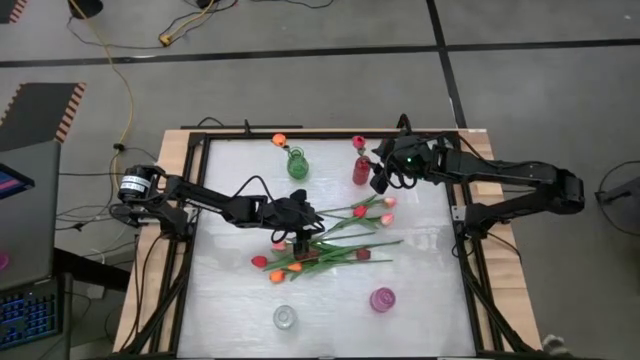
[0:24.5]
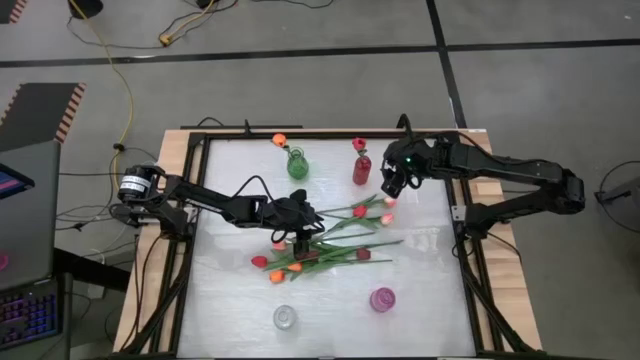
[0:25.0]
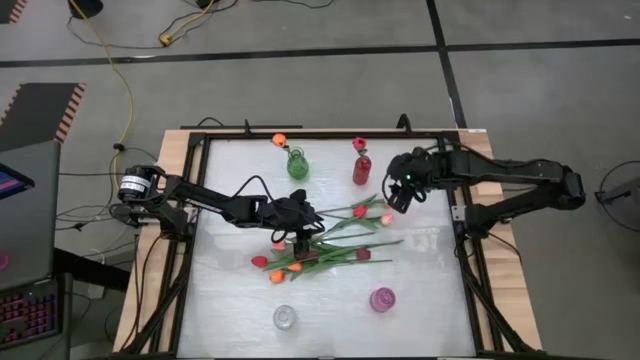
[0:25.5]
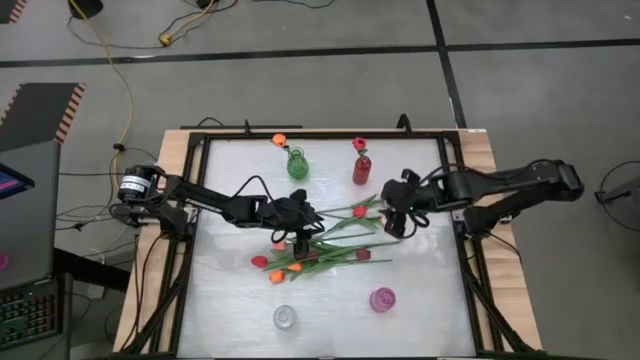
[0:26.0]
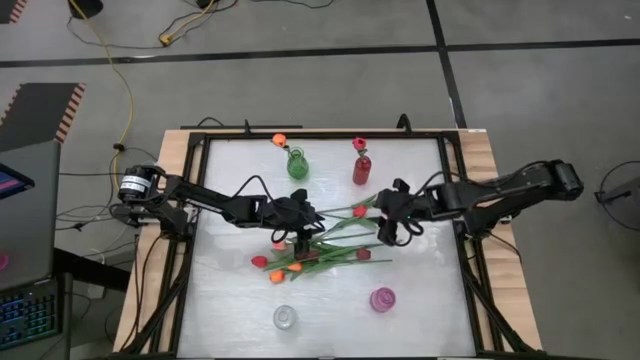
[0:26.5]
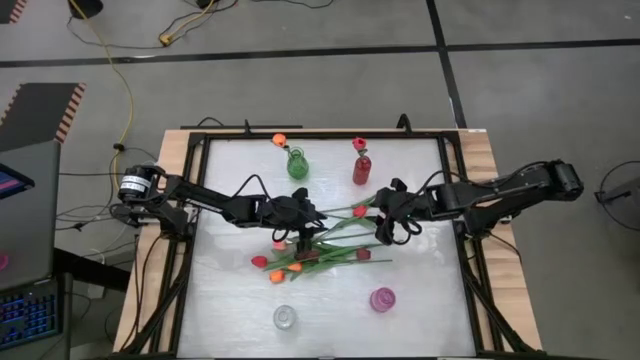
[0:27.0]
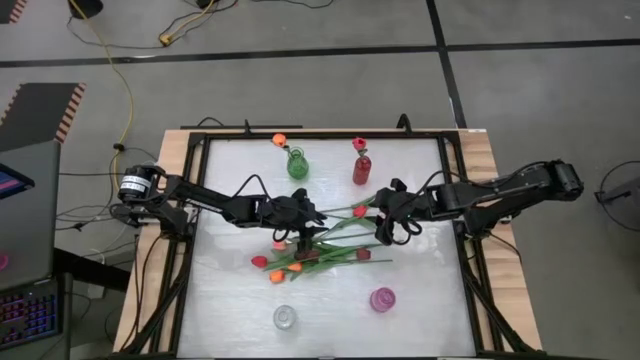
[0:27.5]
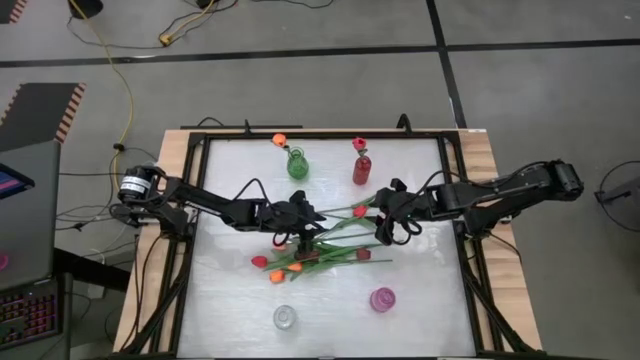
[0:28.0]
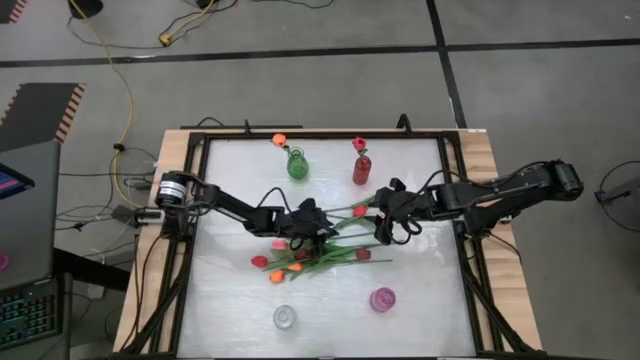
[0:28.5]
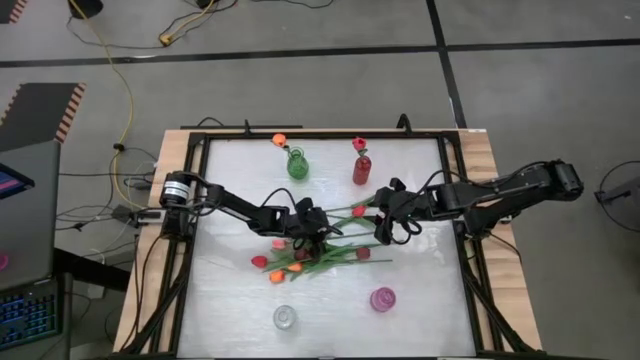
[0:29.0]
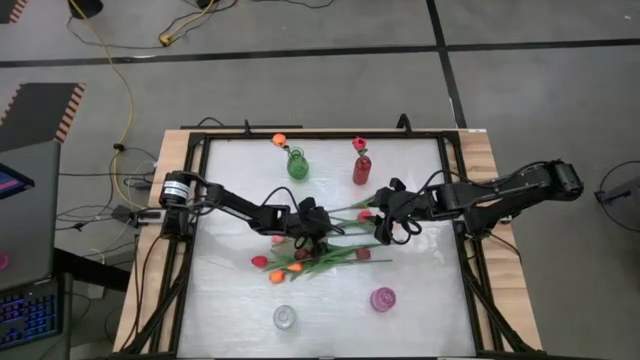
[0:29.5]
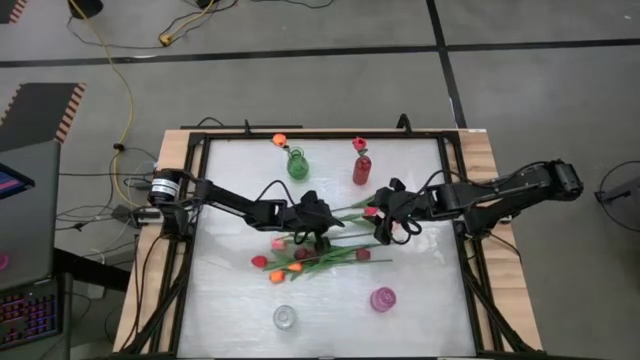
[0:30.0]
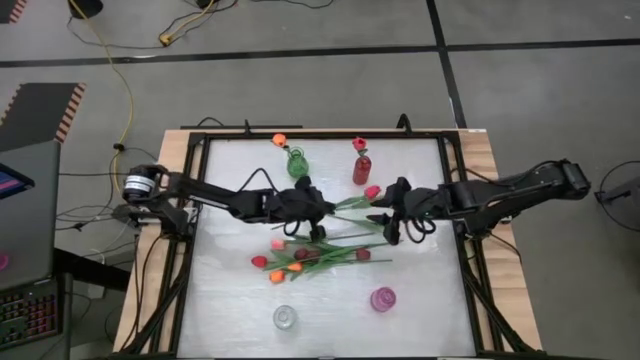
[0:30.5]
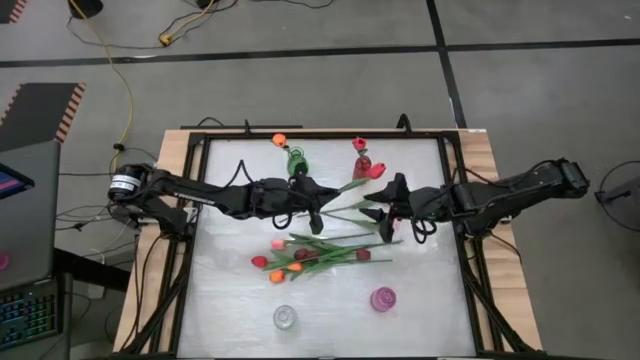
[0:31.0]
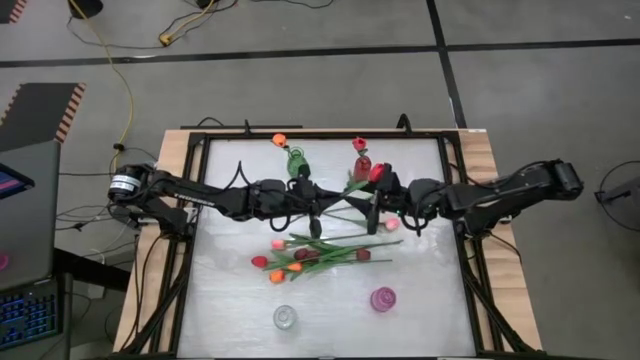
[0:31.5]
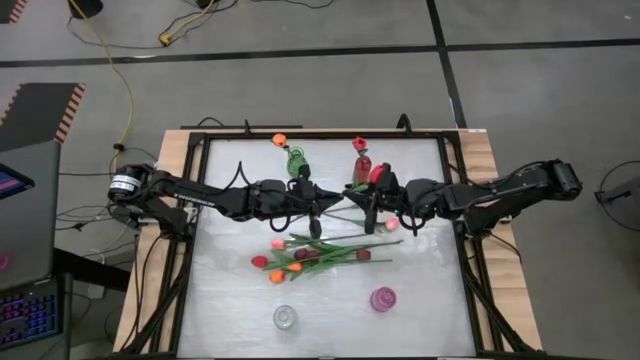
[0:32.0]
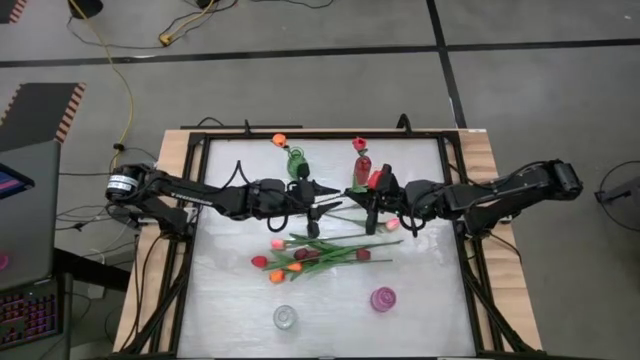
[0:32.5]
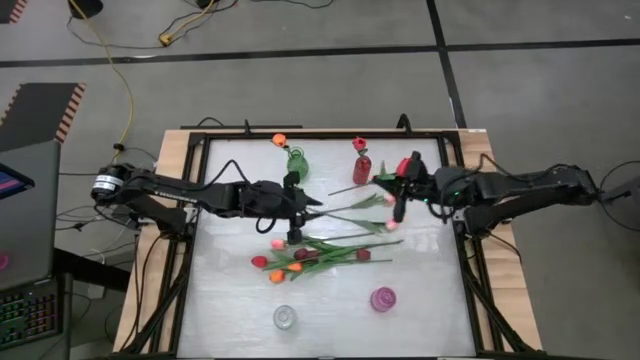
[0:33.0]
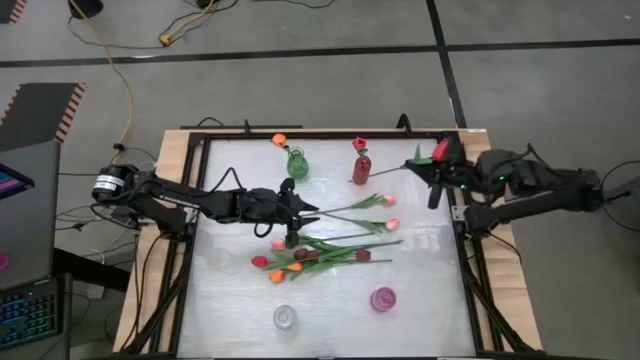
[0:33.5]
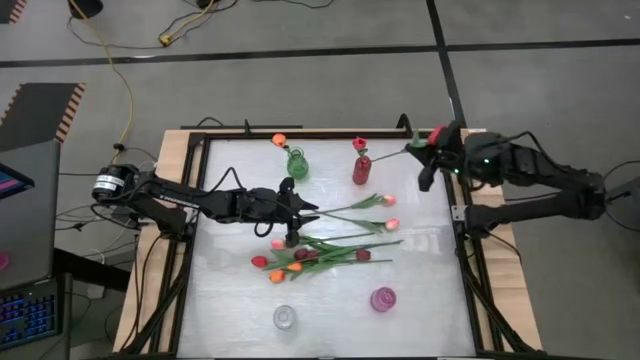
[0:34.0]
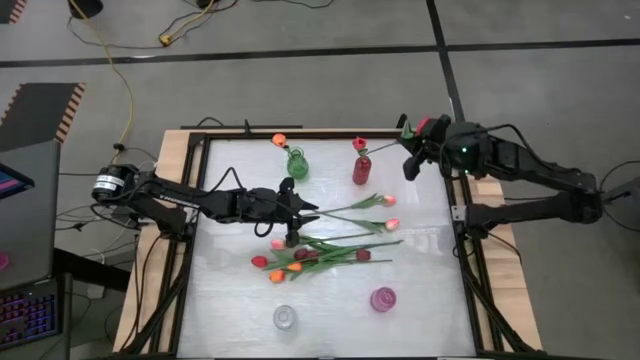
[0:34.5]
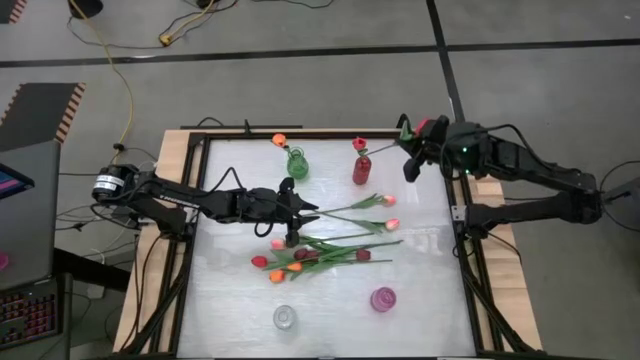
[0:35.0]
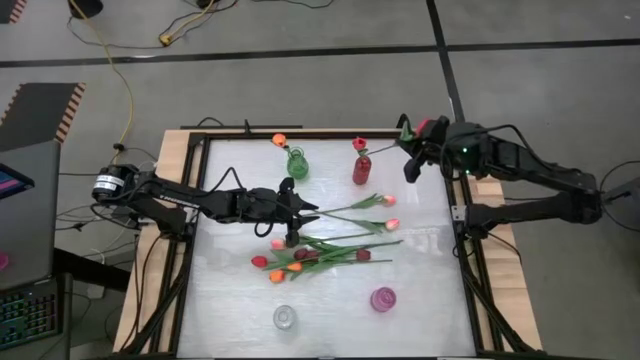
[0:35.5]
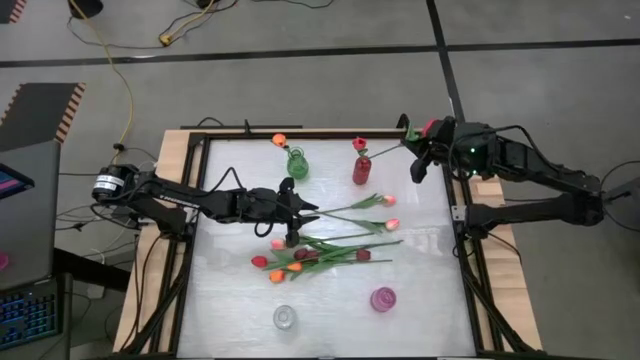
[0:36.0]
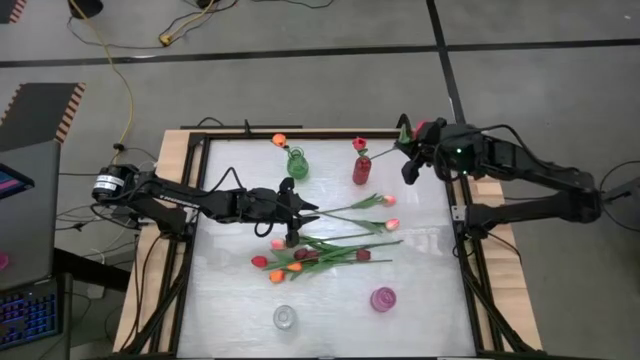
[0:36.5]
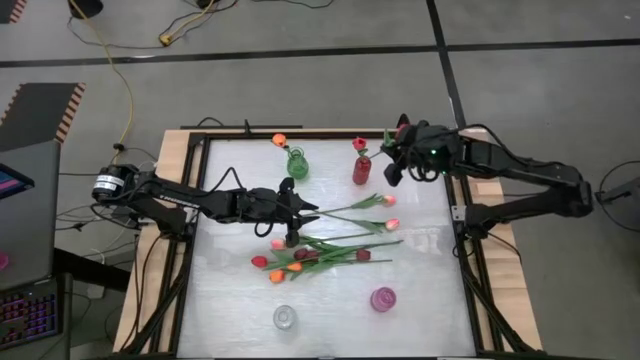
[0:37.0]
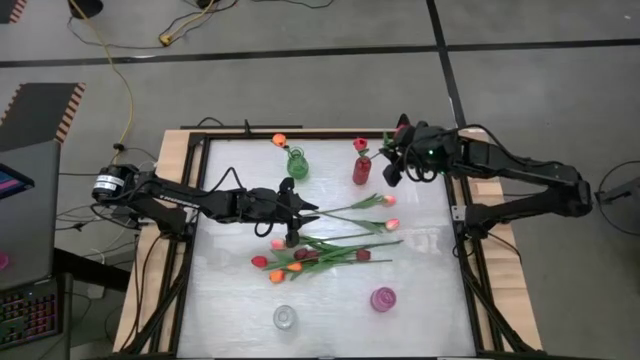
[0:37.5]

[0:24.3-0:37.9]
Task: Sort flowers into vase by color
Put the red flower into the red vase

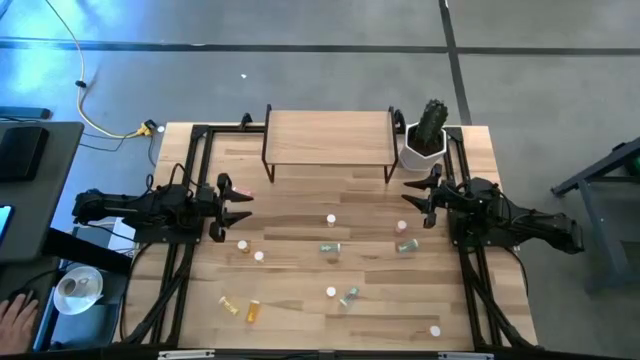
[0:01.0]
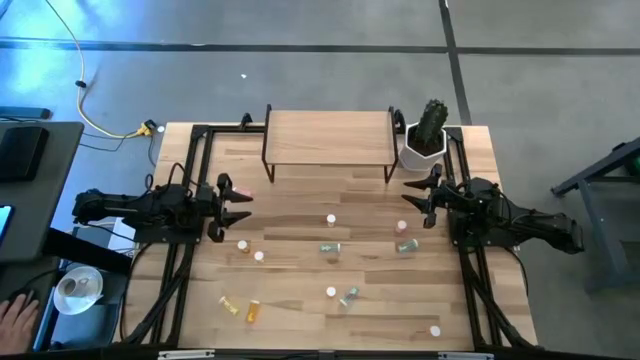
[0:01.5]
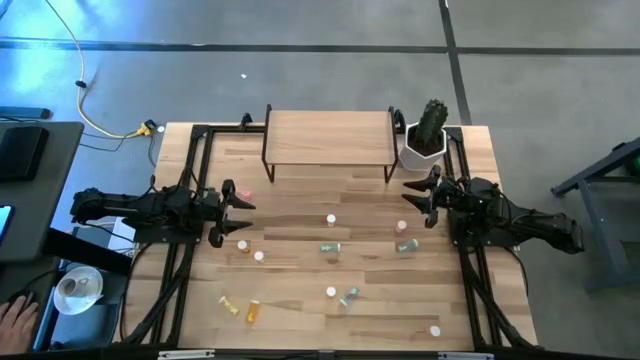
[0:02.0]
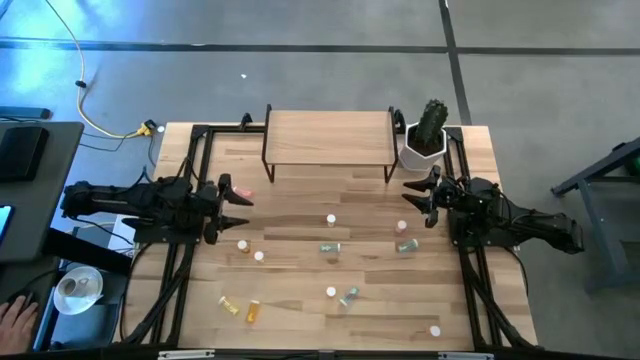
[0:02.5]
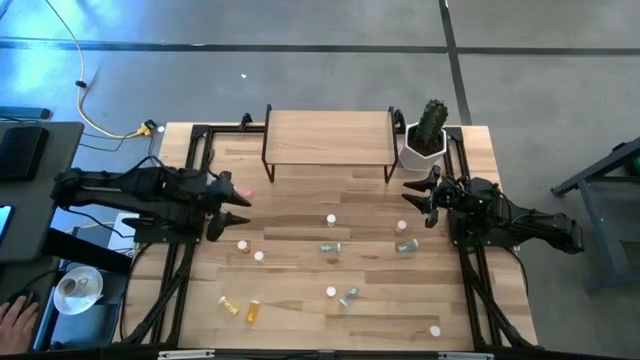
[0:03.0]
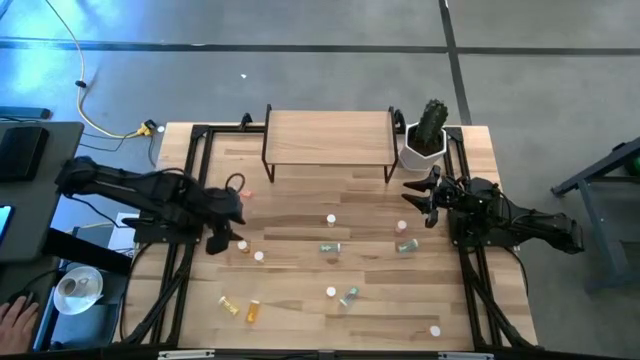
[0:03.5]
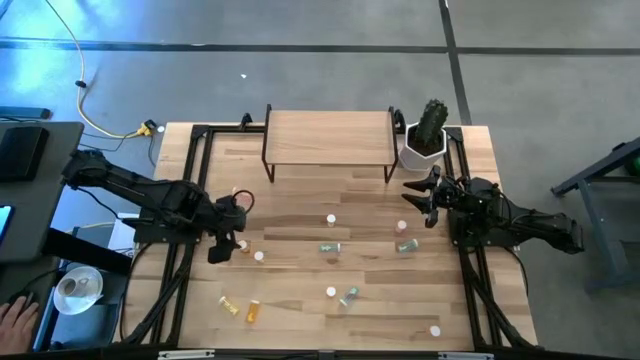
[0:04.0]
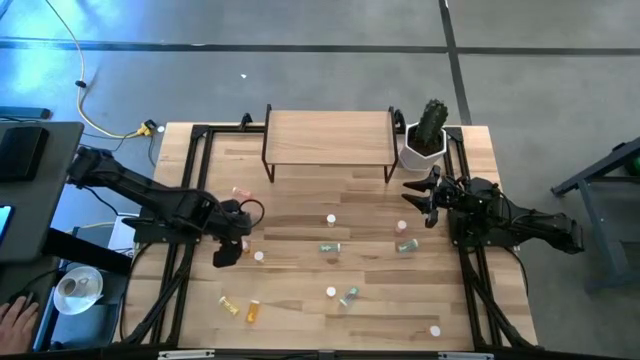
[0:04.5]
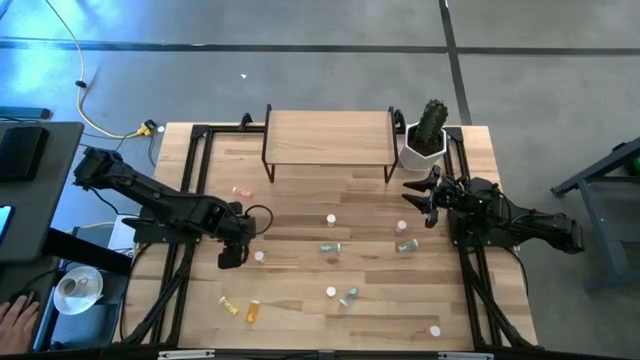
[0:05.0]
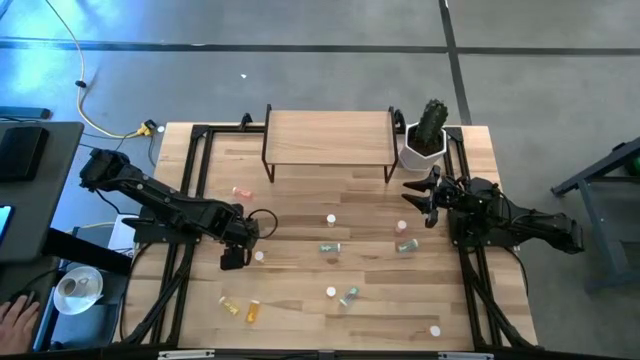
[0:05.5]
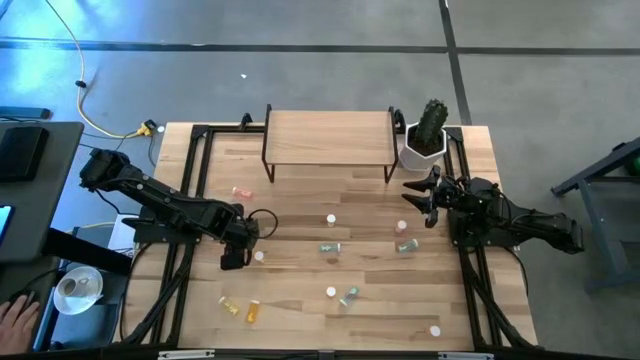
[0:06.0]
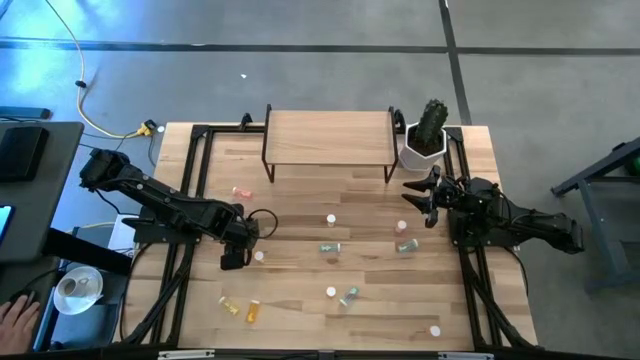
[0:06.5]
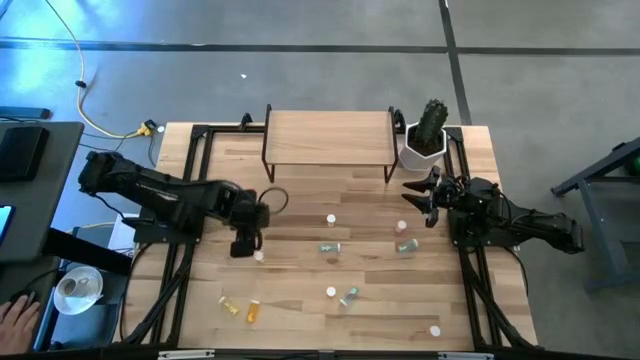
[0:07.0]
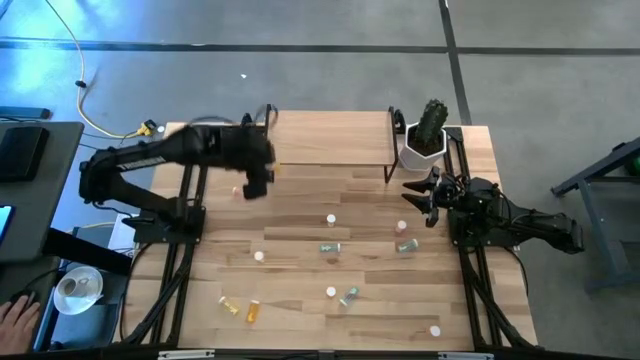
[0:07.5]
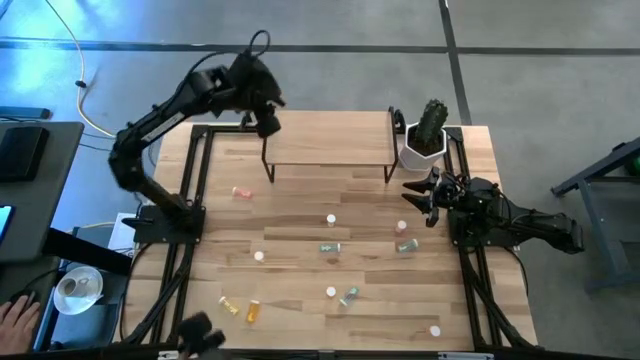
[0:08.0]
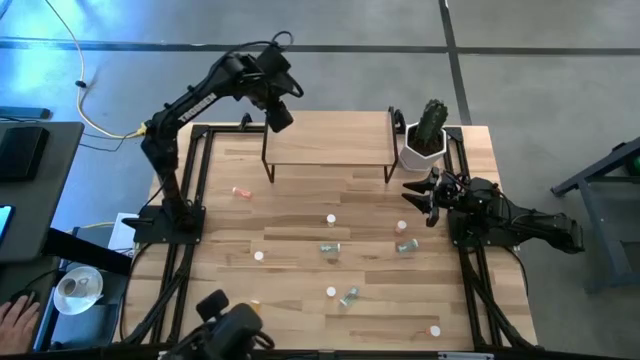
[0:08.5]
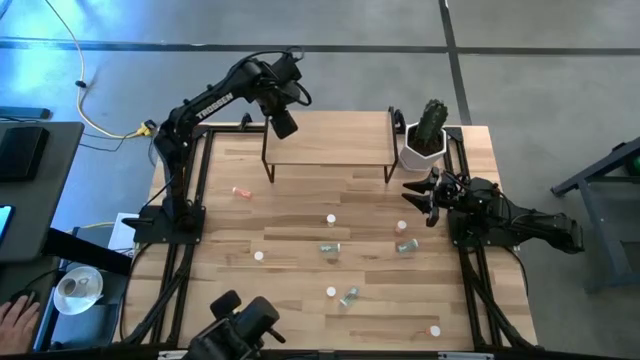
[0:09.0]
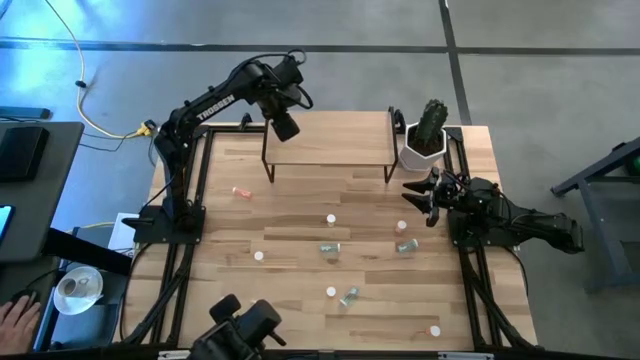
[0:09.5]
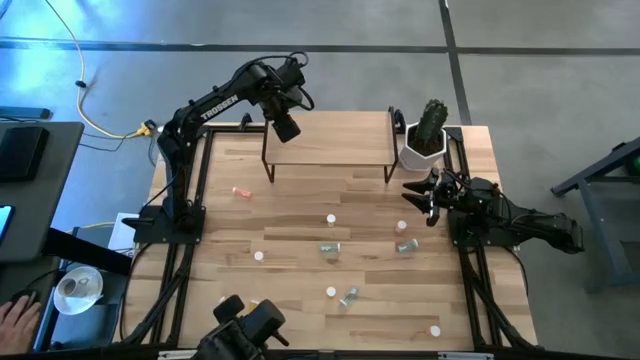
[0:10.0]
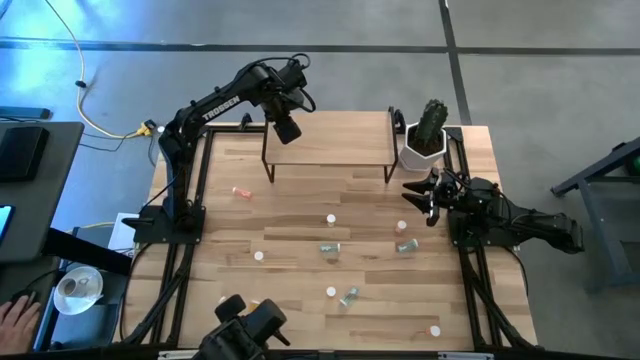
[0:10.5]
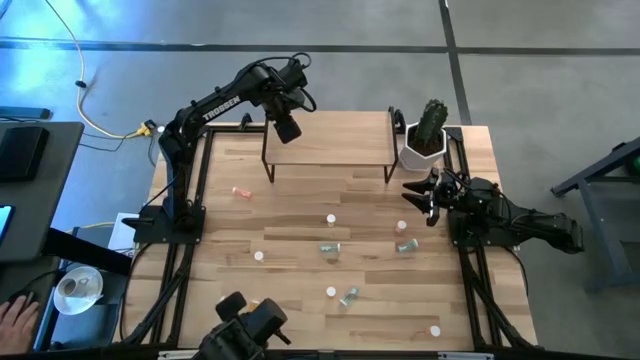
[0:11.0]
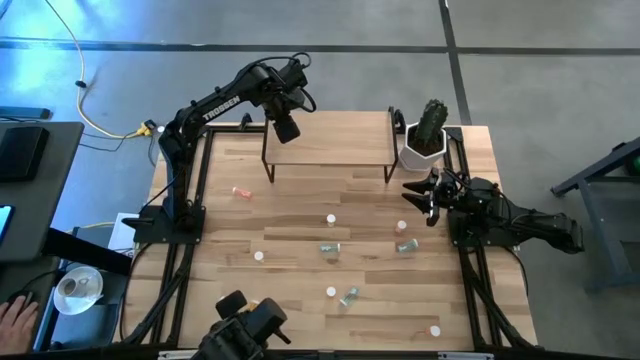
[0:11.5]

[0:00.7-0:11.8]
Task: Pick and place medicine bottles onto shelf by color
Put the top left orange pill bottle on the shelf
